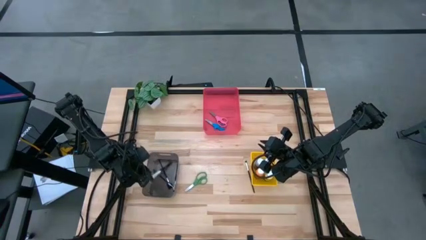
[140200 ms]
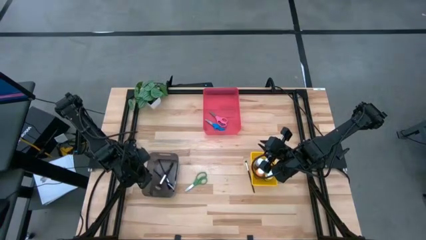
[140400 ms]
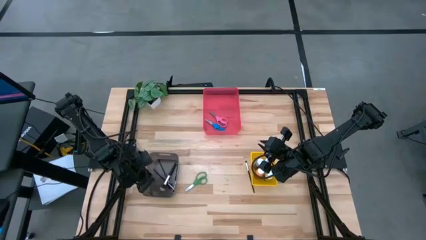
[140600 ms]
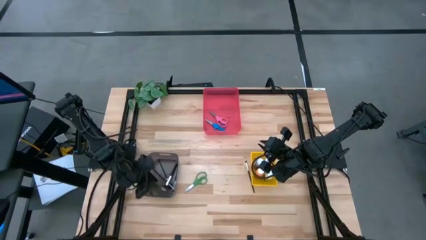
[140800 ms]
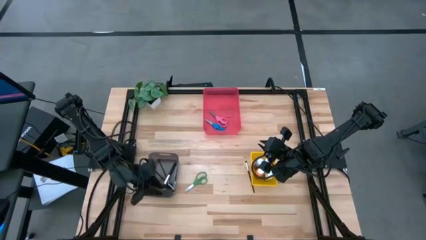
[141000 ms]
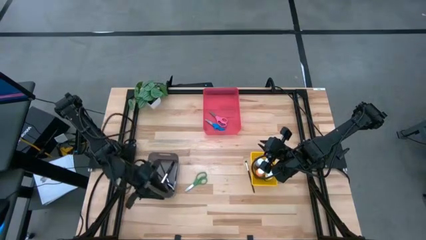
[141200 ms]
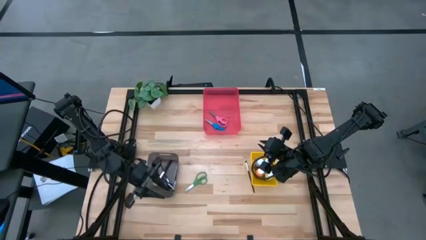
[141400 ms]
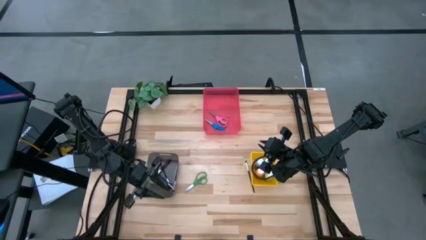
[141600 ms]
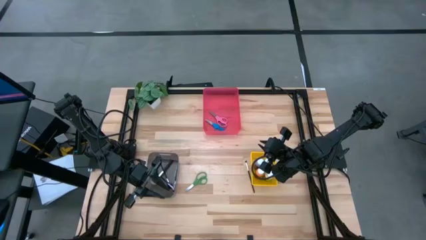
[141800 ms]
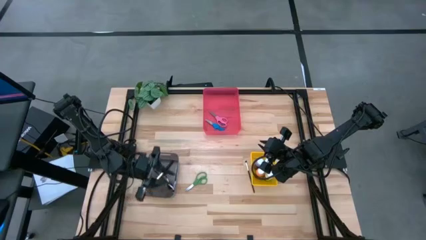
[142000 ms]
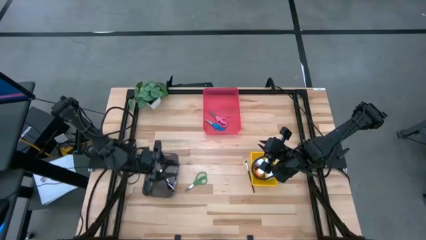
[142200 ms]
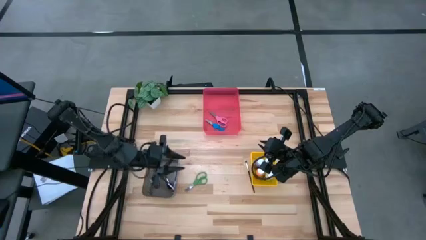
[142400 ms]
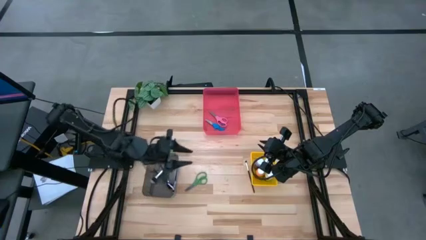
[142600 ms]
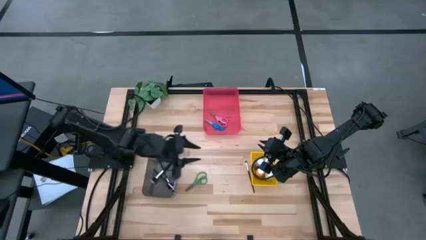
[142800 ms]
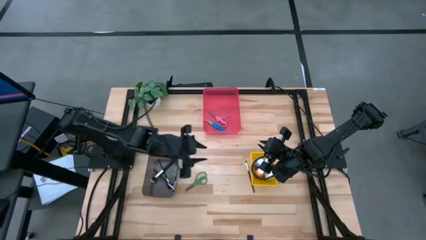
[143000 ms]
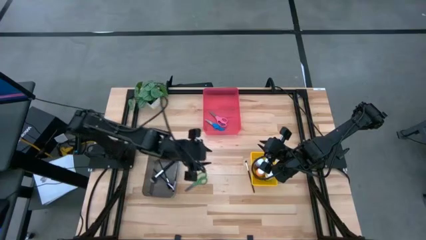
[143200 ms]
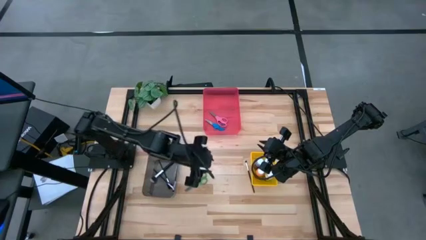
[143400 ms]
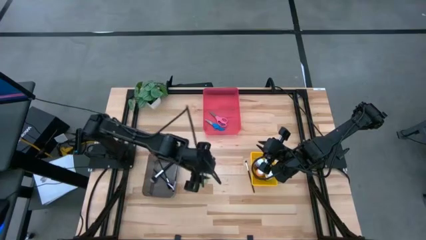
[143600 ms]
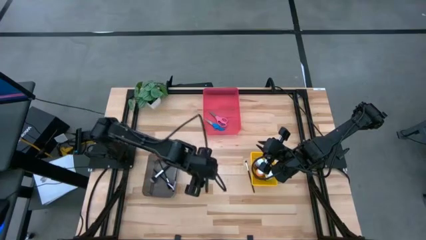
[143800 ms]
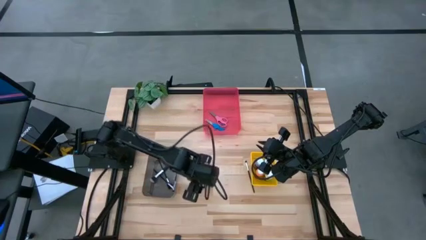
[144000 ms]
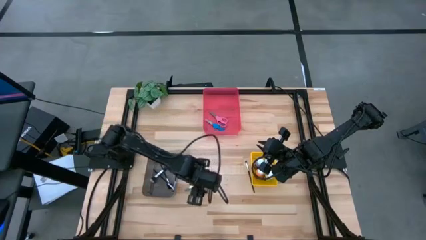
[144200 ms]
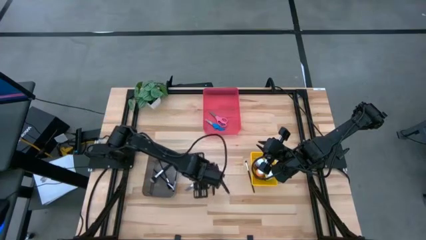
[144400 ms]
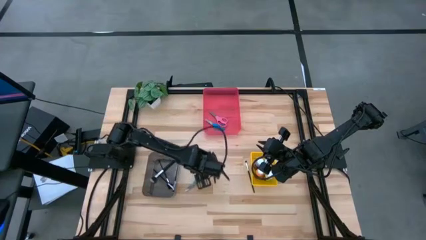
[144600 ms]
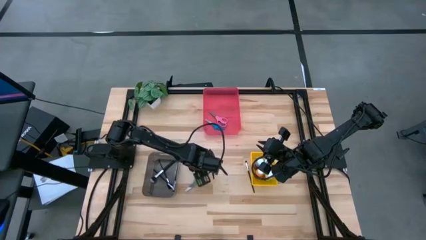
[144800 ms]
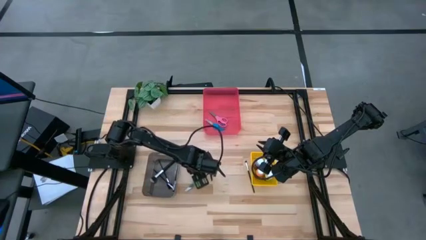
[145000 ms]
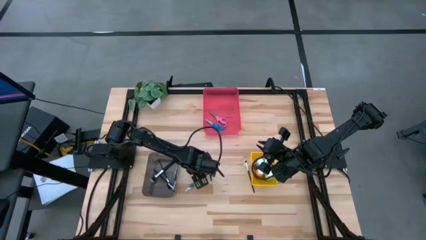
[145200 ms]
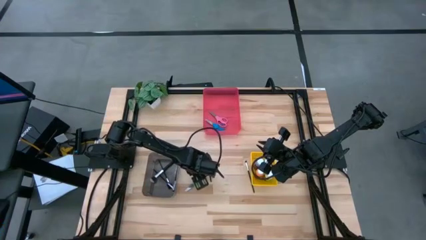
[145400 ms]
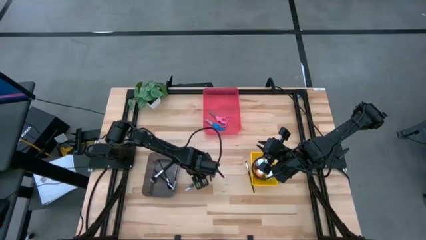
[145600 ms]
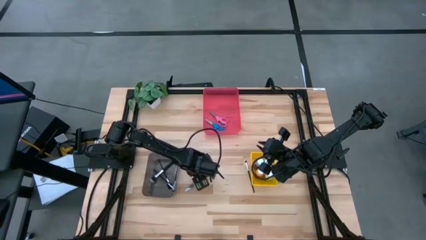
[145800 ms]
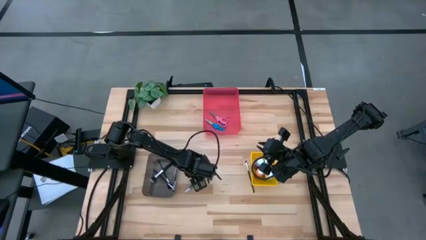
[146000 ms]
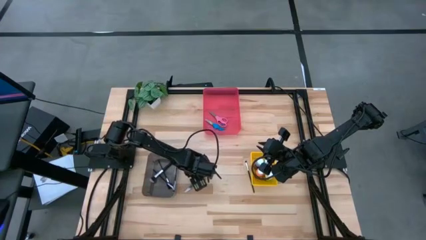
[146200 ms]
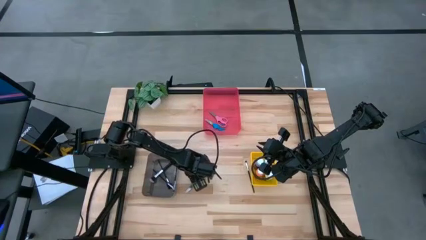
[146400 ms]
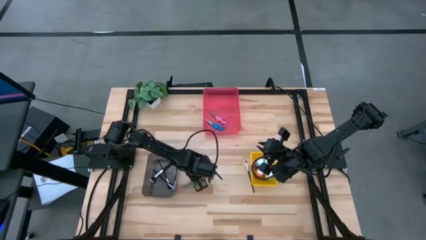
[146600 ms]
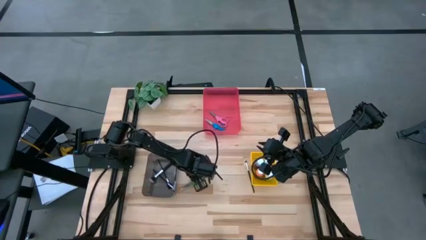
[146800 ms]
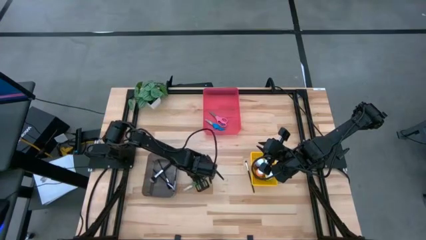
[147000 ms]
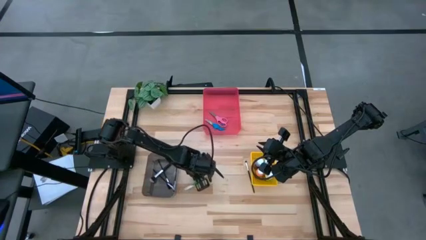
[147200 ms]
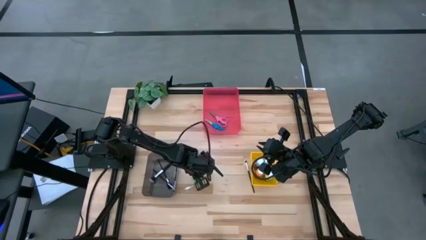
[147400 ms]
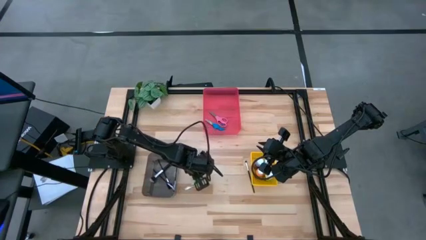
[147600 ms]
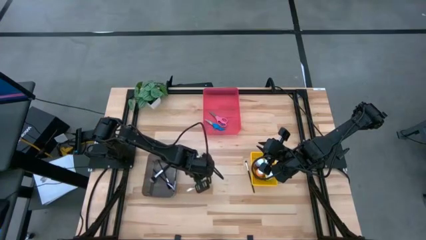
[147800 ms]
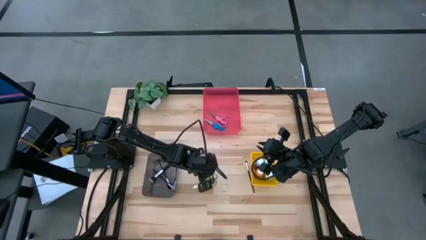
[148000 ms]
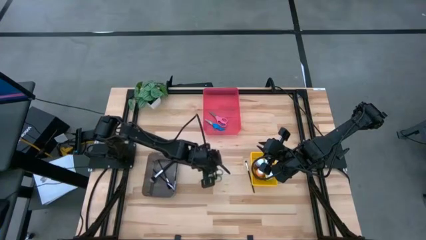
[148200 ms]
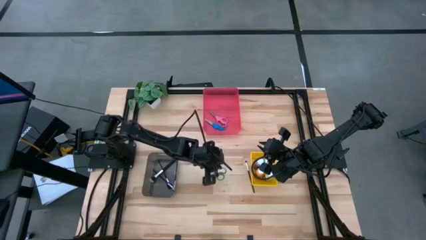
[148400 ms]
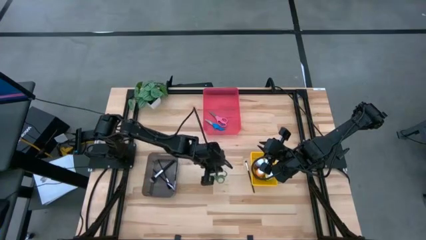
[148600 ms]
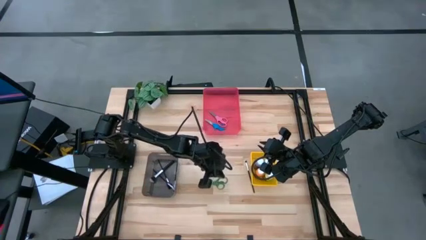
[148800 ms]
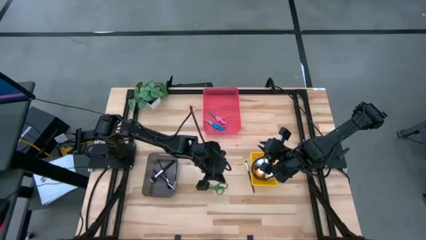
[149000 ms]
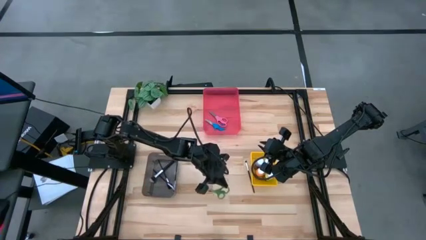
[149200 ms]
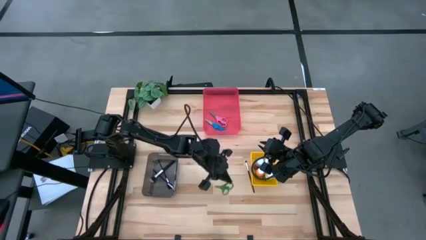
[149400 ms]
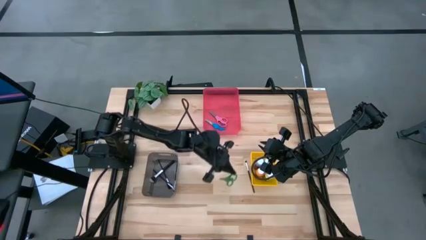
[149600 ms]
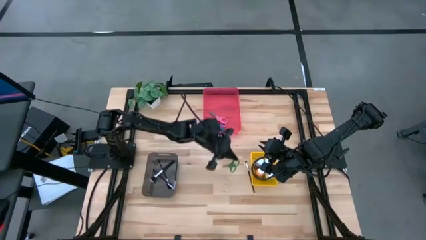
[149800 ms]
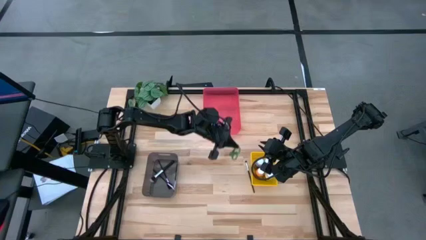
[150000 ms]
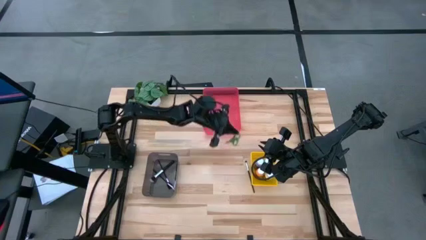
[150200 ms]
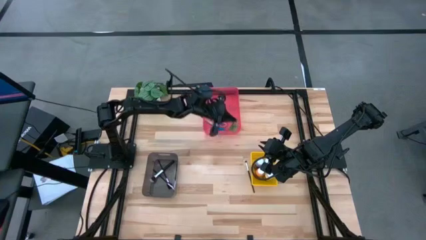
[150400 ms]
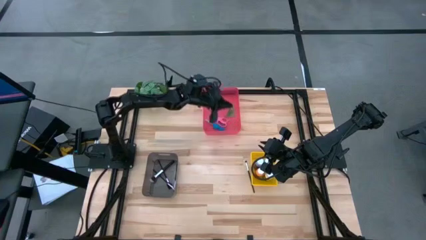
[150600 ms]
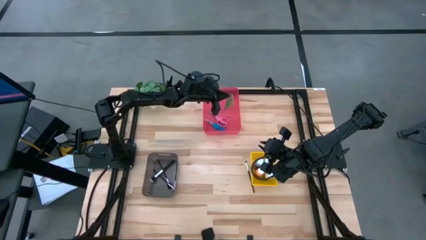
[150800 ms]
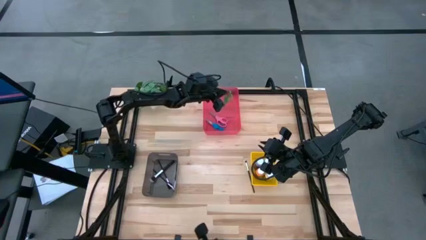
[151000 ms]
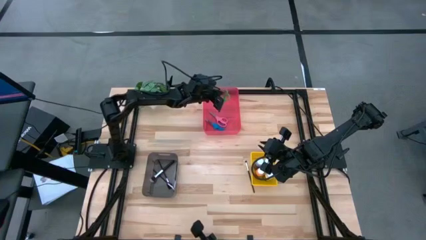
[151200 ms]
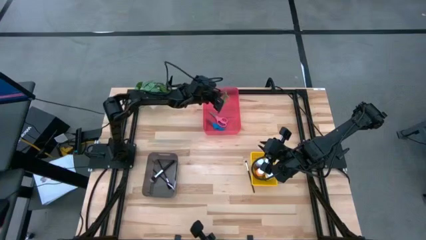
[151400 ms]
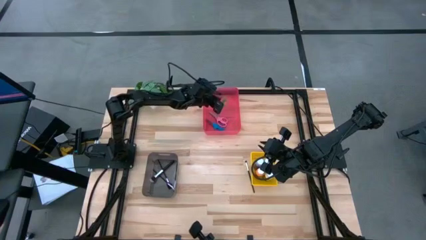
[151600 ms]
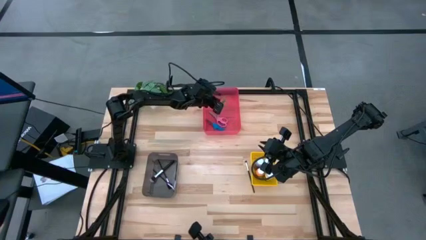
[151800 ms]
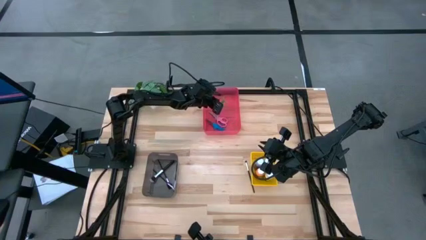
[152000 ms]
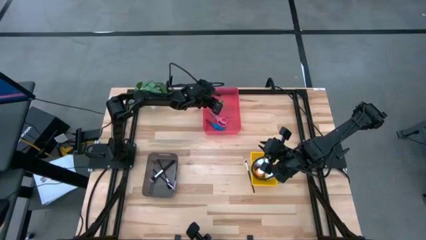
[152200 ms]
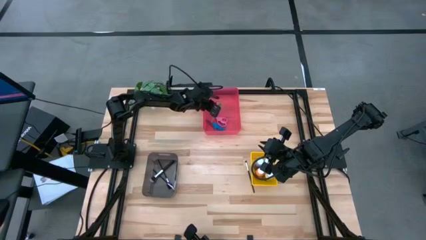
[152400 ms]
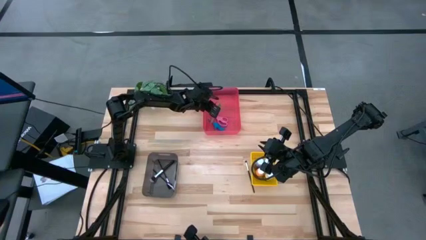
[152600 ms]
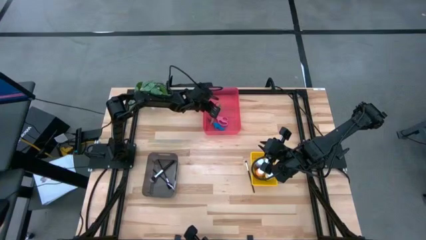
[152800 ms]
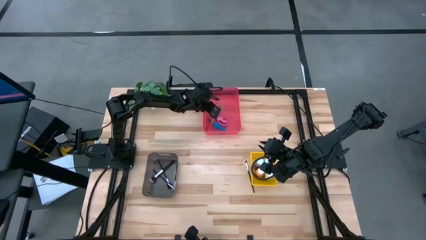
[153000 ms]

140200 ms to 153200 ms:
Task: Pick & Place Paint Supplies
Put the green scissors into the pink bin

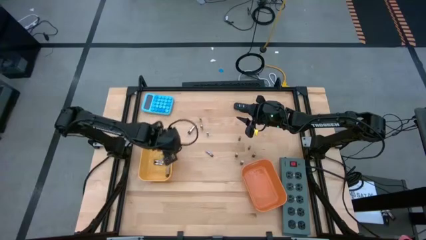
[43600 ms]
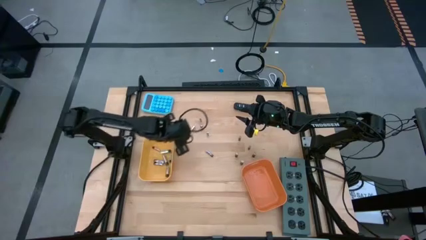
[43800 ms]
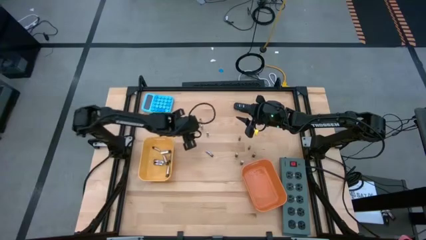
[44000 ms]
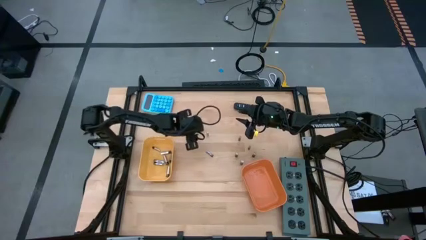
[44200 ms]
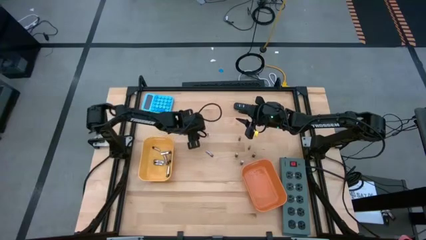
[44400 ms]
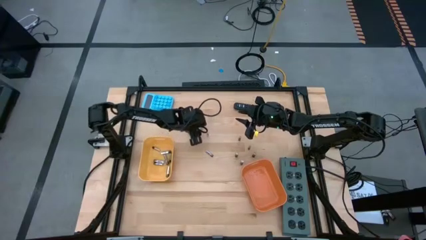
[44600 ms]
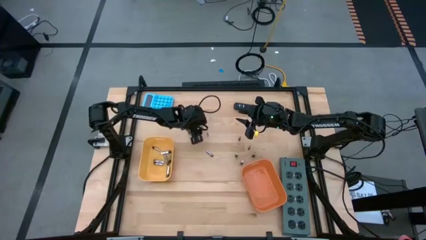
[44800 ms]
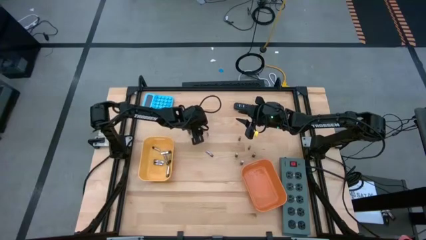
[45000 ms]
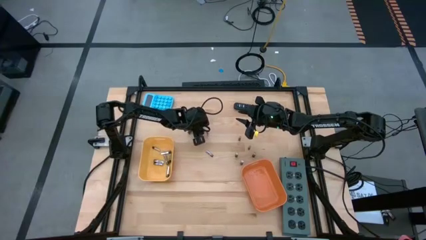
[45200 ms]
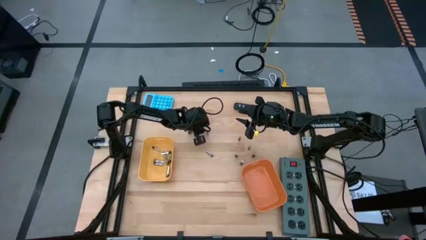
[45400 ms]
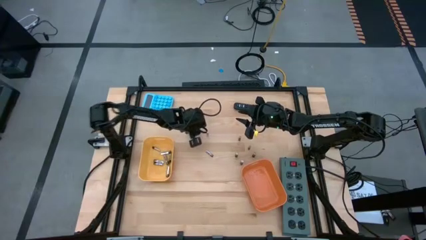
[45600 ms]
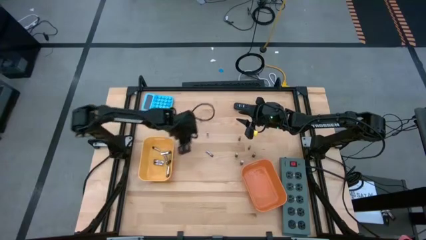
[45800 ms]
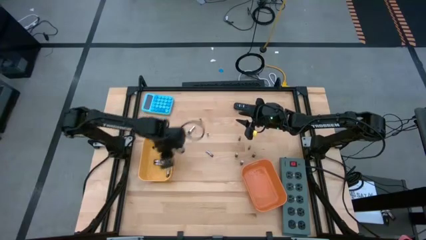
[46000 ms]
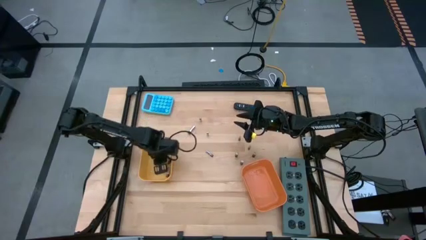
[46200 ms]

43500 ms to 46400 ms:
Task: Sort batteries
Put the silver battery into the yellow bin
